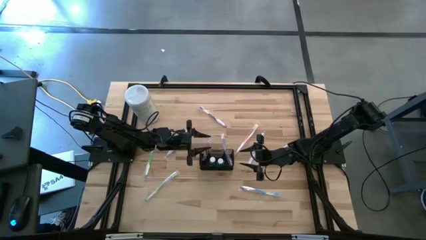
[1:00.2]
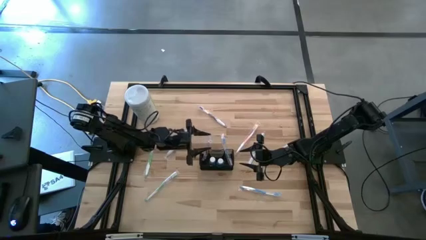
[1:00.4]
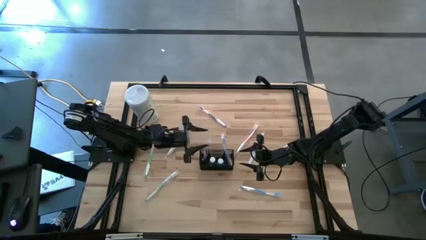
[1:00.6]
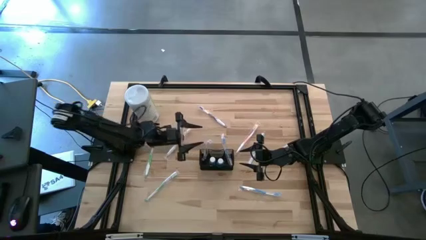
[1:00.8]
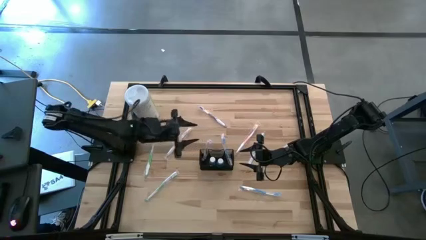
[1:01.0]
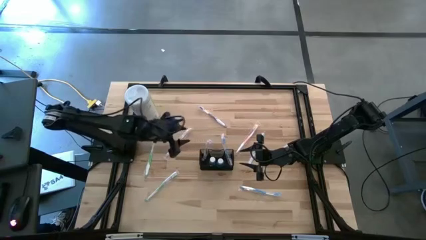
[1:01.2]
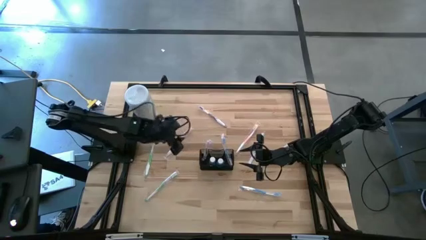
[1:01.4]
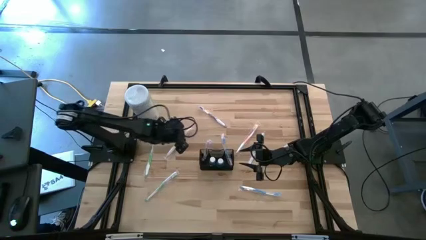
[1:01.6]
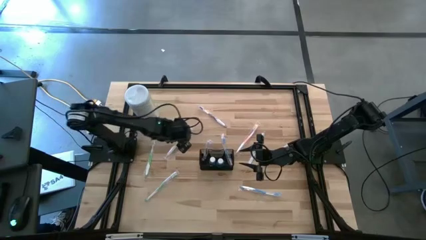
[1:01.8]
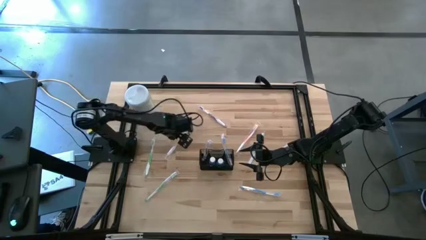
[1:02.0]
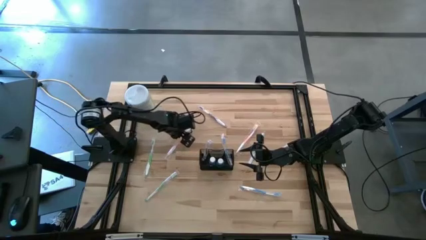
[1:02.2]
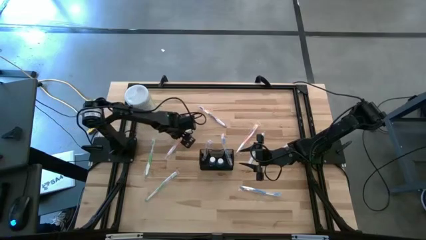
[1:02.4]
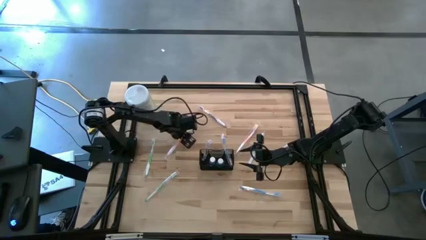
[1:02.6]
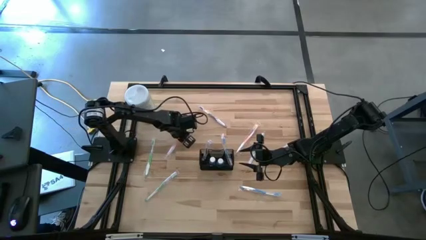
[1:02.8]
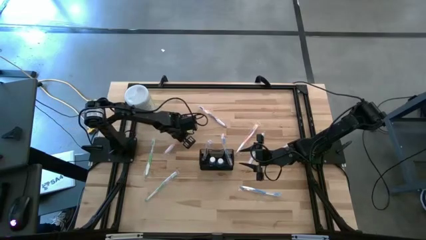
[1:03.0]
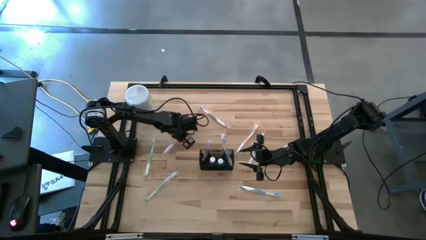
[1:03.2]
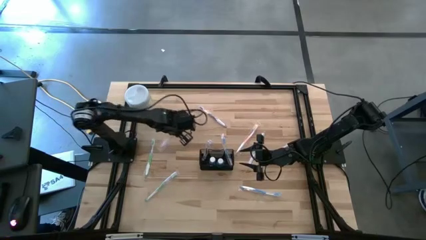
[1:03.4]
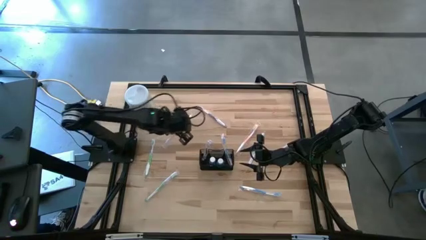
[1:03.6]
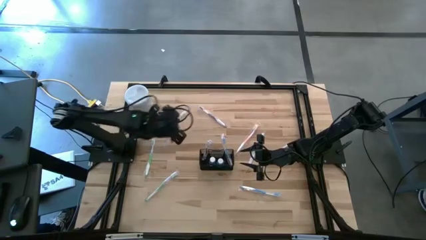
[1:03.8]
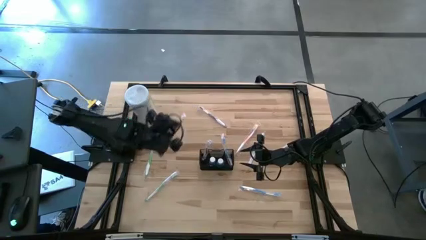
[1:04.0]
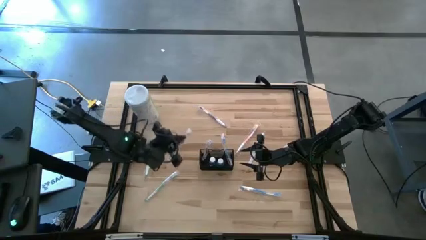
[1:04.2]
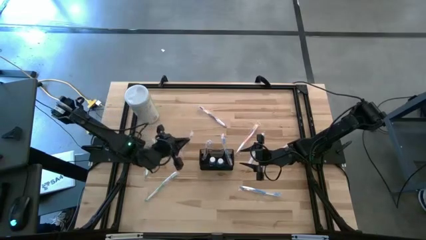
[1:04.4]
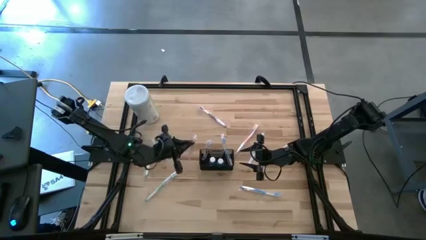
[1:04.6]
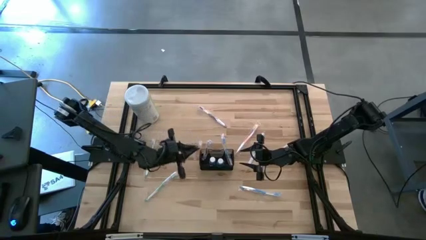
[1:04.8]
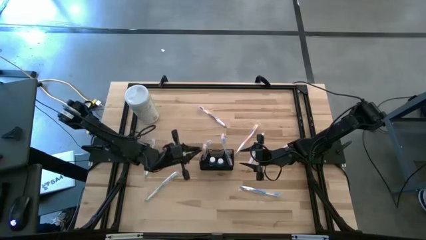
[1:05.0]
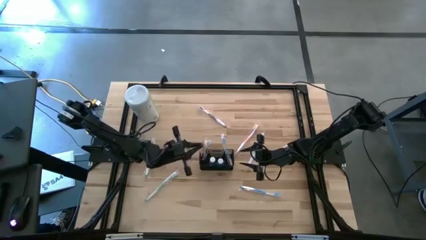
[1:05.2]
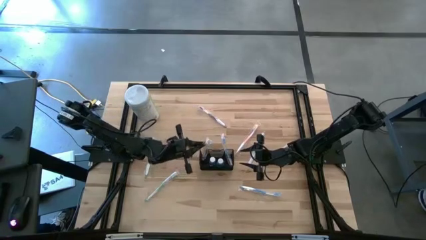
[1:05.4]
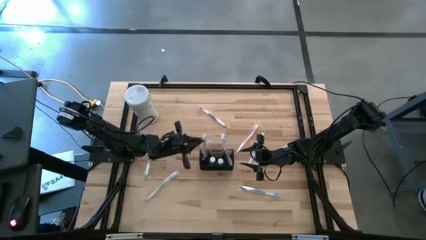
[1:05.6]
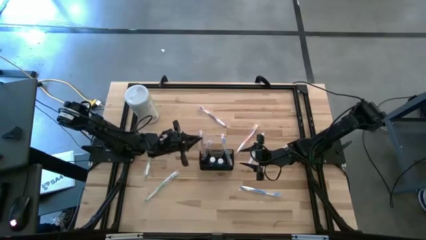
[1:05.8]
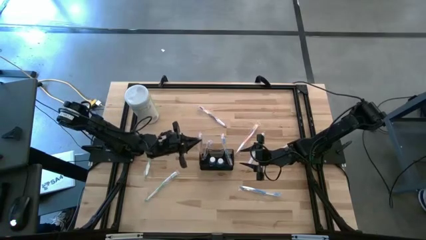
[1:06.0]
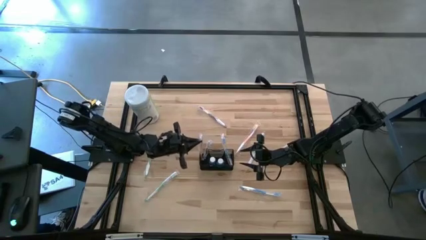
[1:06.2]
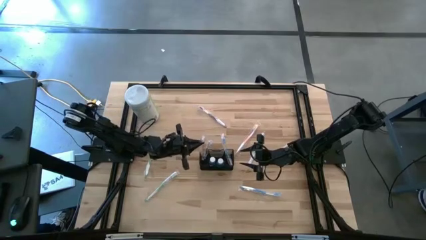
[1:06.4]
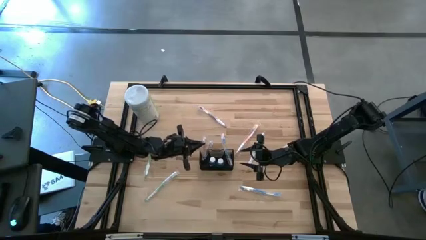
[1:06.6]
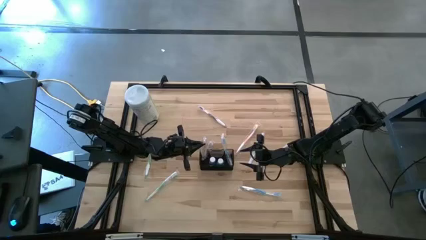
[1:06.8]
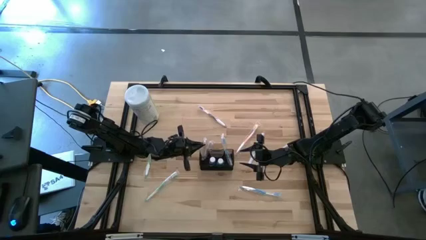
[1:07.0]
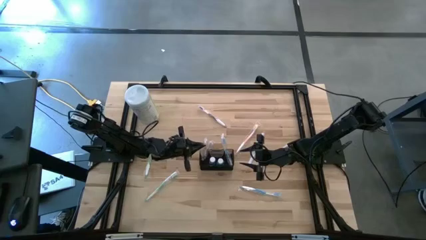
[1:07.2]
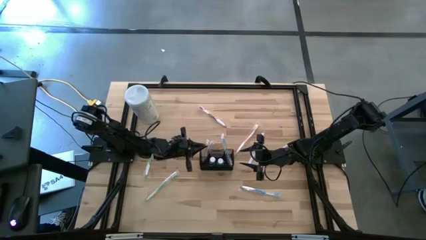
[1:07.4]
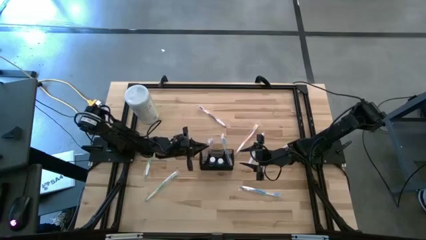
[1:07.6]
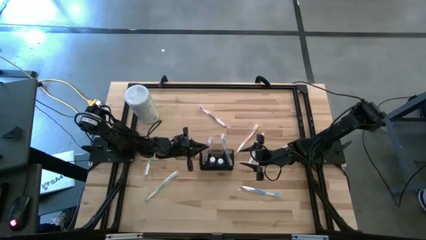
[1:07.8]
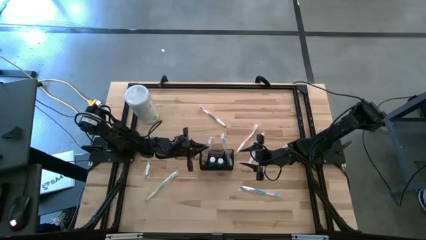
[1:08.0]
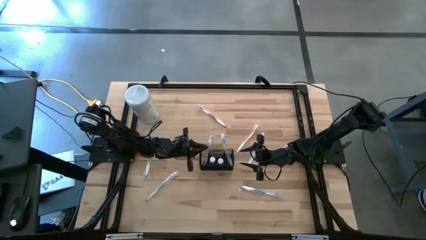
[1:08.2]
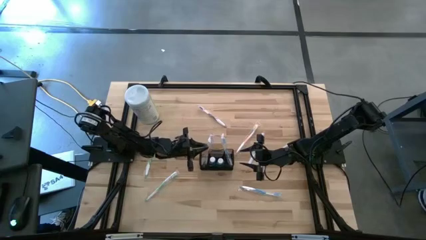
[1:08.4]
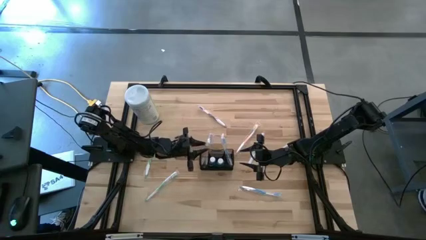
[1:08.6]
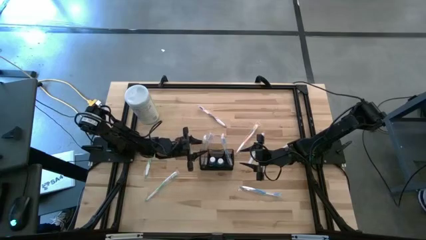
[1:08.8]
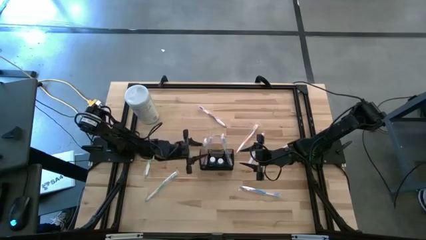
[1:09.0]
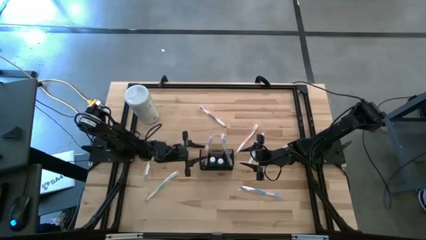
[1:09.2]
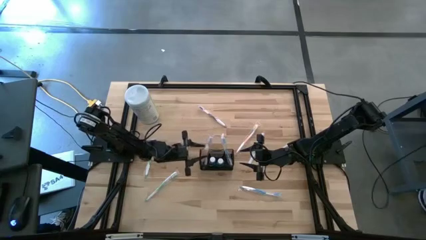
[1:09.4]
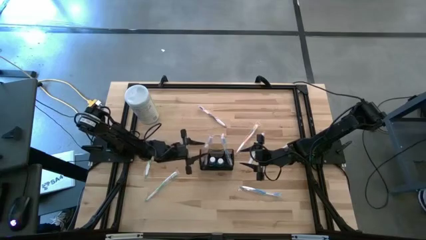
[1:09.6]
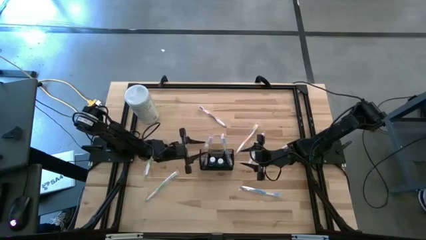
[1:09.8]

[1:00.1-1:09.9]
Task: Pick & Place toothbrushing station
Put the left orange toothbrush into the black wire organizer

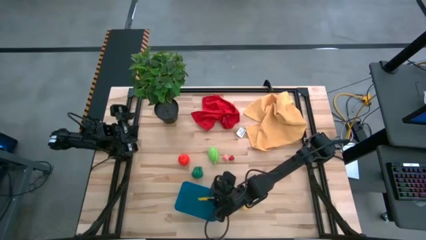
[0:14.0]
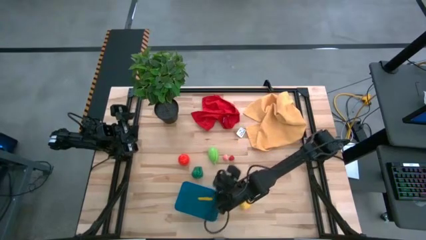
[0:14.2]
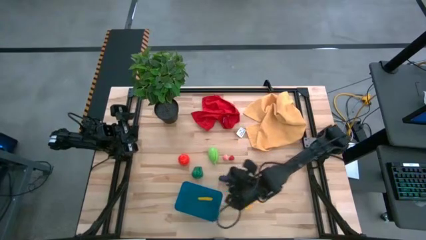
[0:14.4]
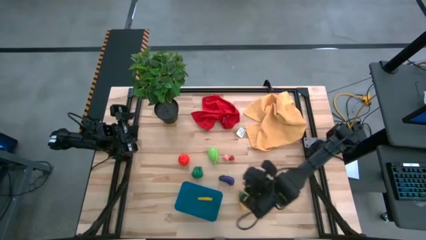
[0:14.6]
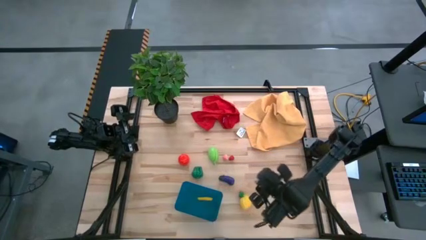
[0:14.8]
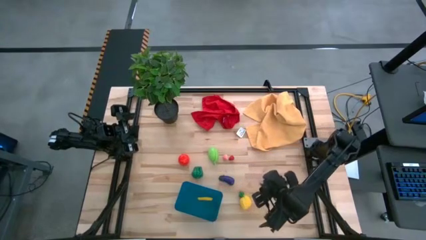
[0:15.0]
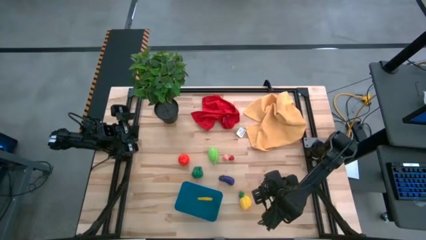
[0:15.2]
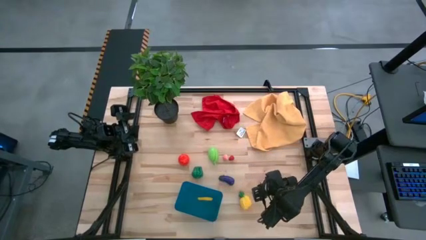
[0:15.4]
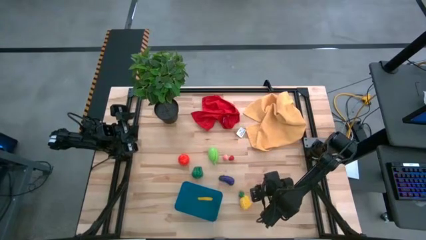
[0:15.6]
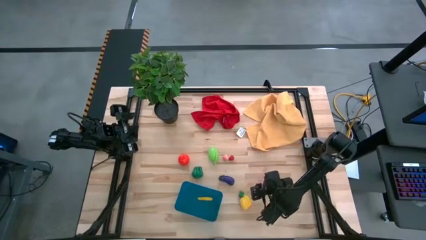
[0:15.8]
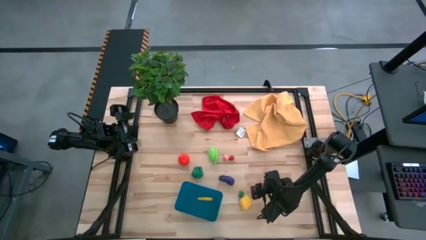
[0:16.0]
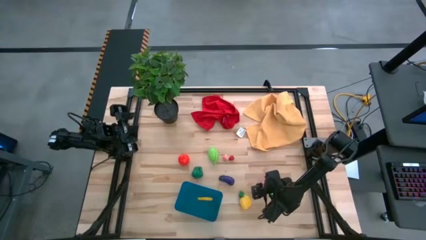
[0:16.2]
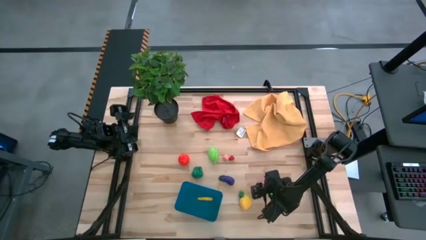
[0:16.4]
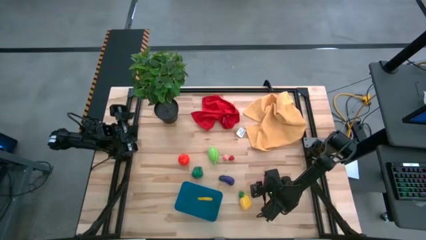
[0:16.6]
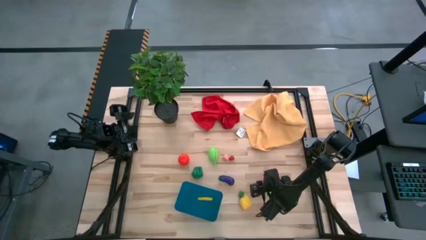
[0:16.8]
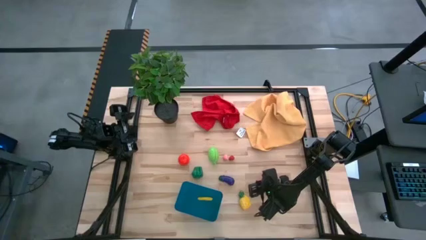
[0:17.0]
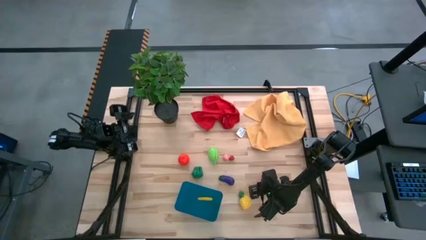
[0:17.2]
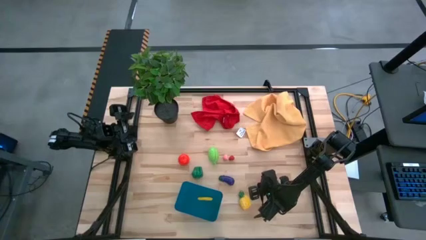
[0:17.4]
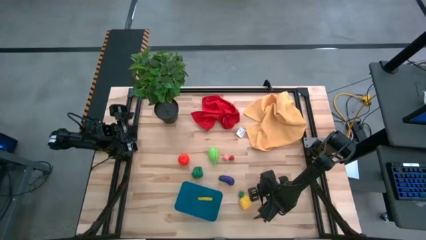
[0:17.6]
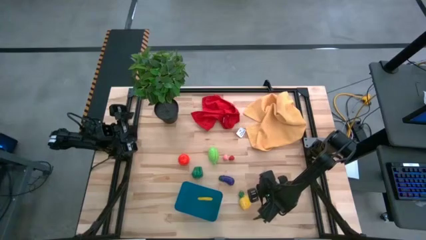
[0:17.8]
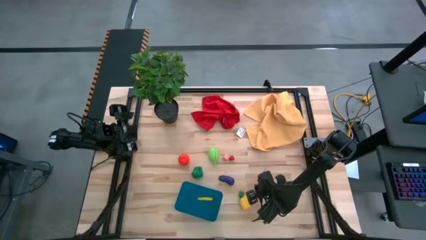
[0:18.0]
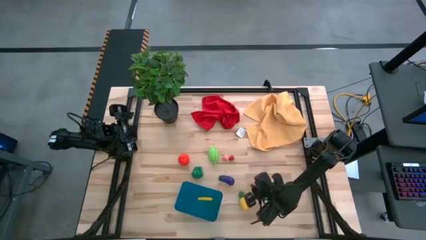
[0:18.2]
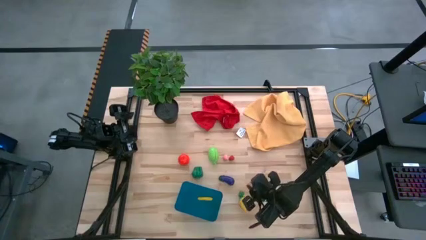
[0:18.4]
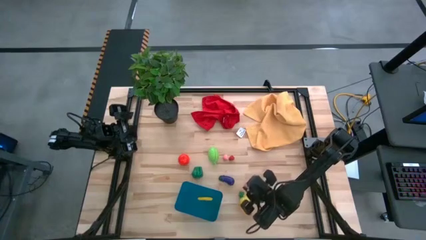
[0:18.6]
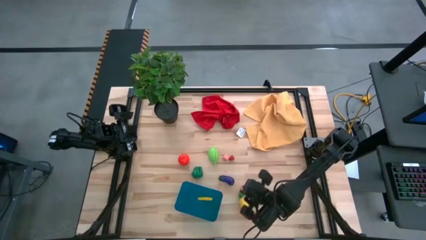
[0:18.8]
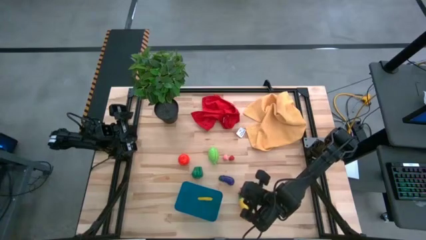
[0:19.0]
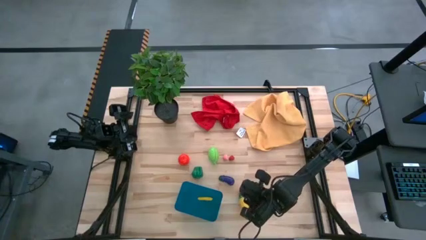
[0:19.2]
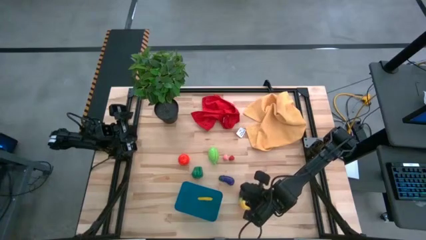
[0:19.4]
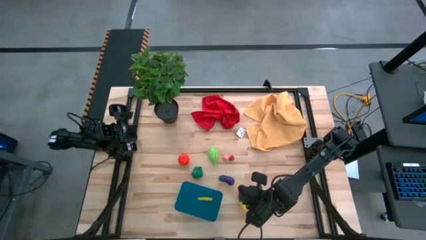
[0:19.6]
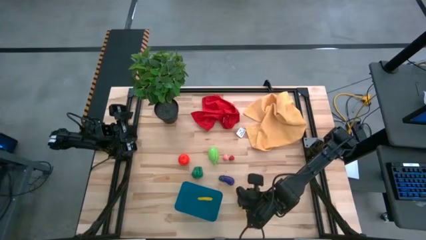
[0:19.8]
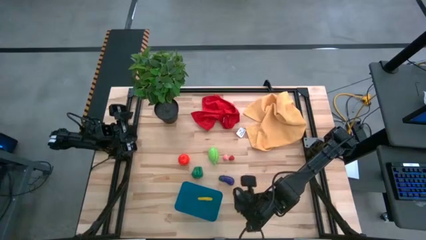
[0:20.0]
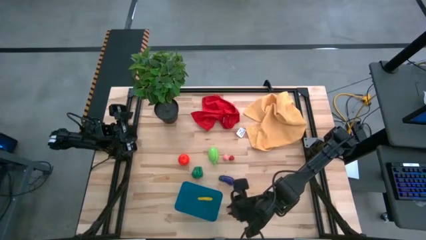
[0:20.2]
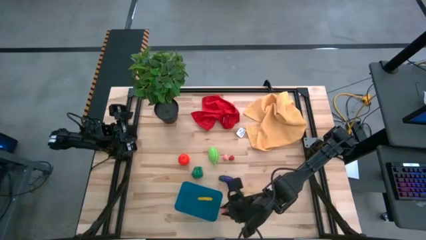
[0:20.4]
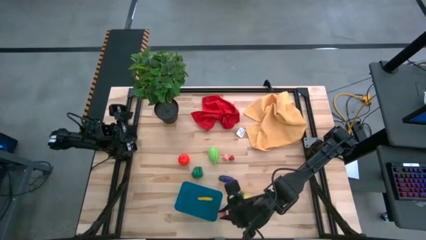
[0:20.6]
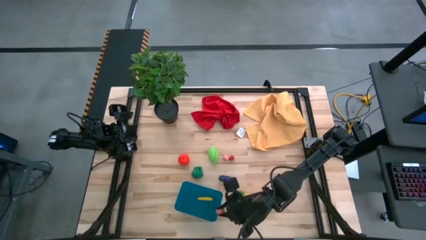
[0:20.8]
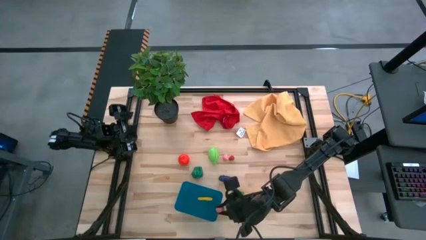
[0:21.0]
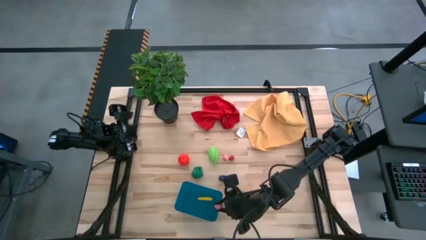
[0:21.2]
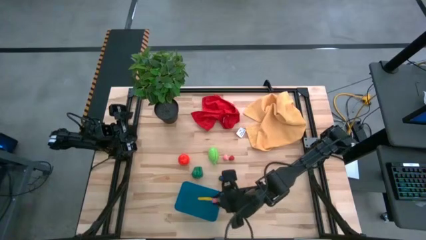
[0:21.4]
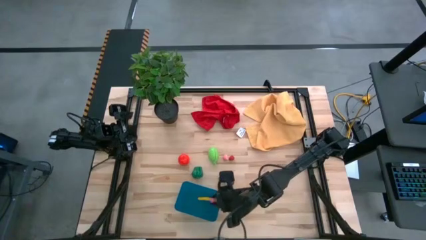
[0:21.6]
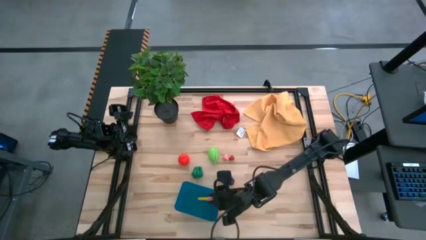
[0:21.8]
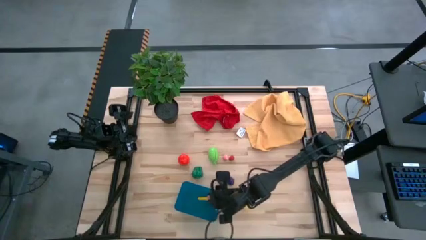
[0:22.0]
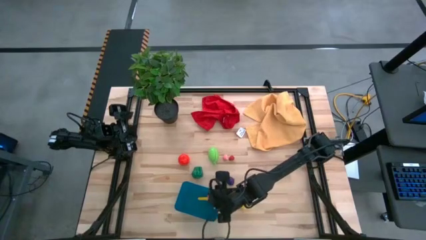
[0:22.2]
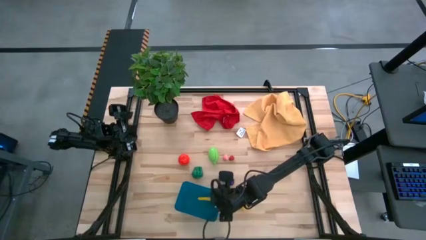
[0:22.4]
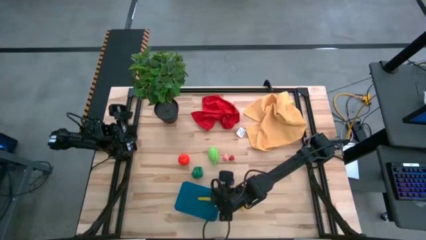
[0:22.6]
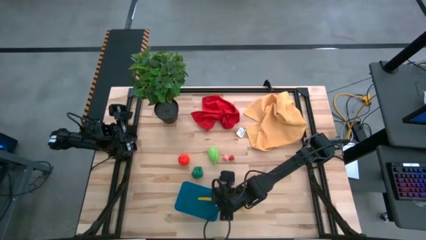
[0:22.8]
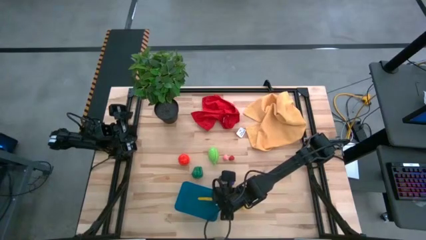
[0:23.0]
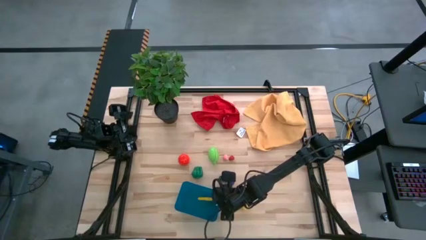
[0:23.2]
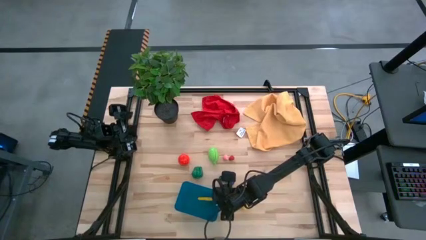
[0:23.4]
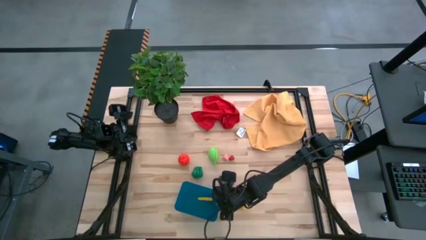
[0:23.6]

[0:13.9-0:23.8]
Task: Pick and placing Produce into tupperware
Put the bottom peach into the blue basket
